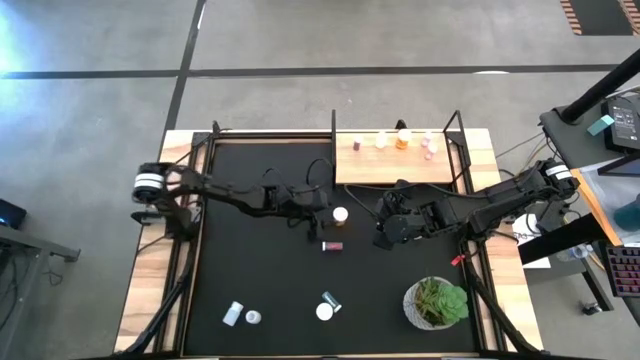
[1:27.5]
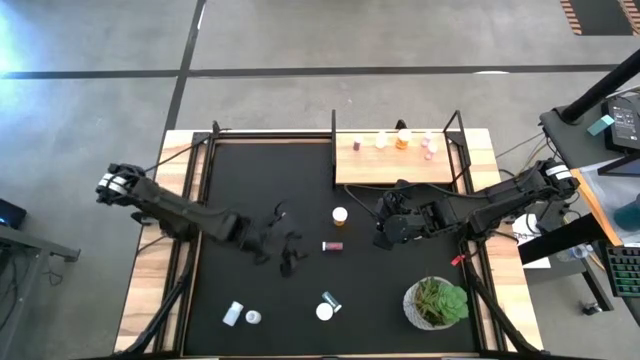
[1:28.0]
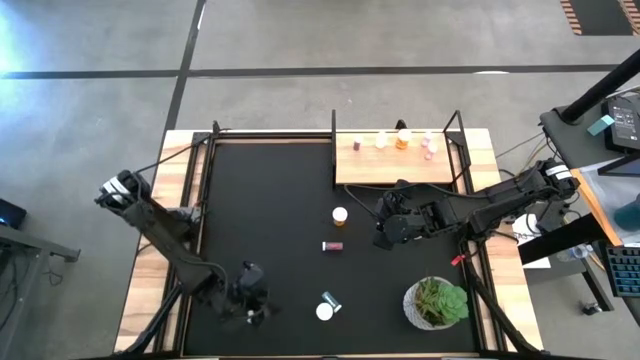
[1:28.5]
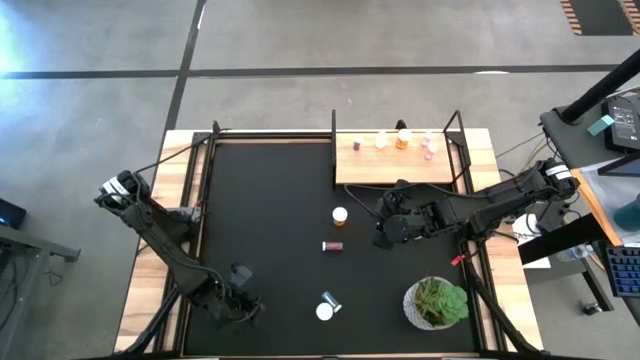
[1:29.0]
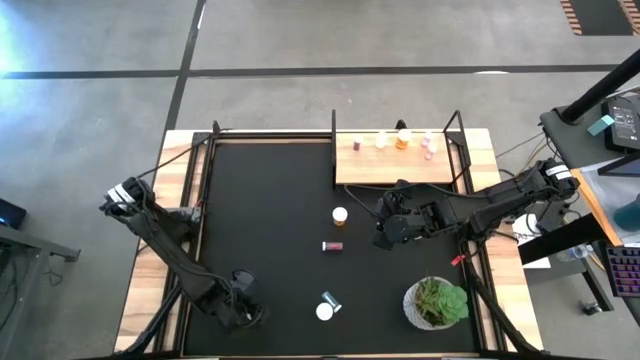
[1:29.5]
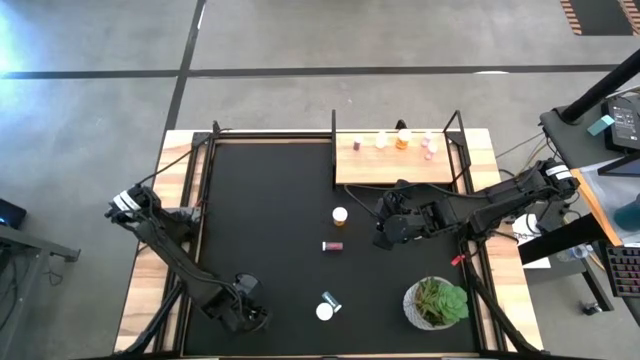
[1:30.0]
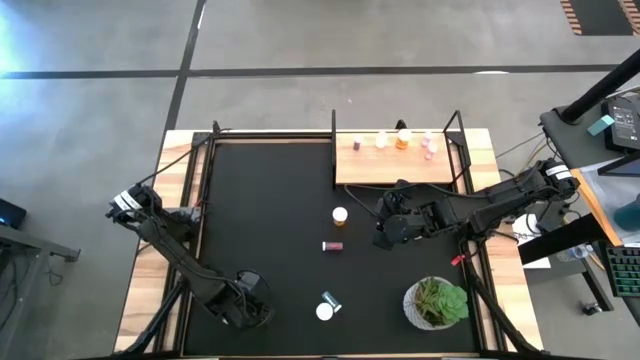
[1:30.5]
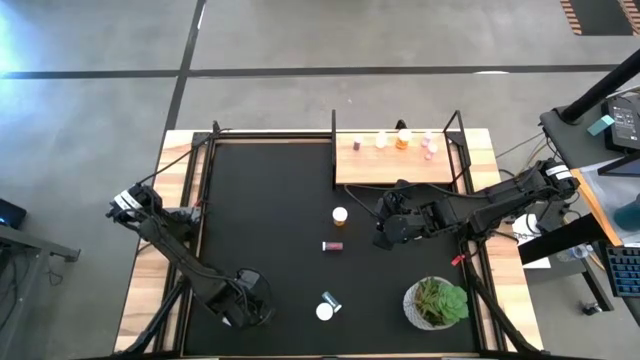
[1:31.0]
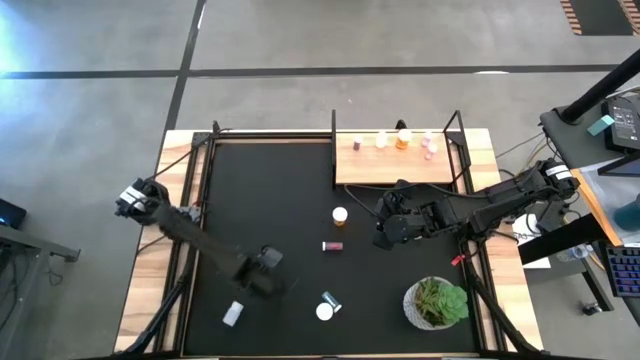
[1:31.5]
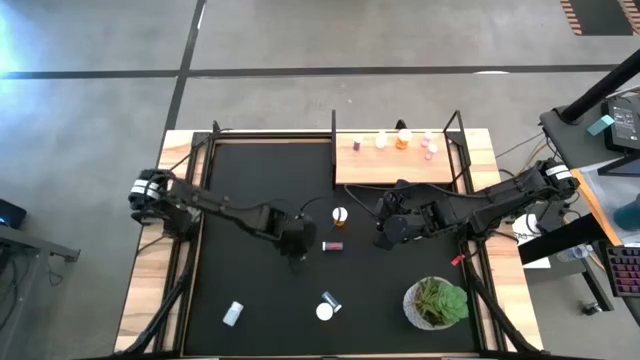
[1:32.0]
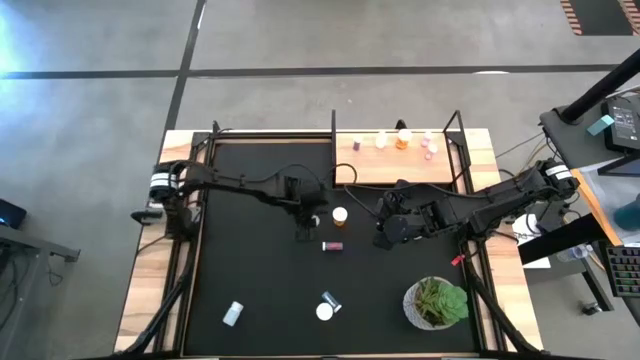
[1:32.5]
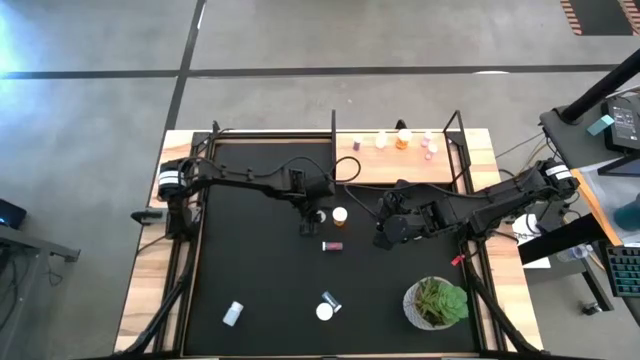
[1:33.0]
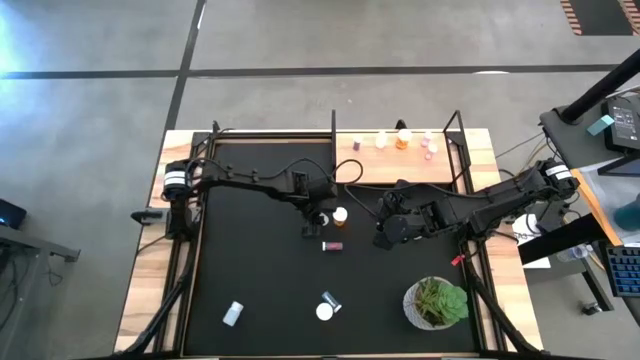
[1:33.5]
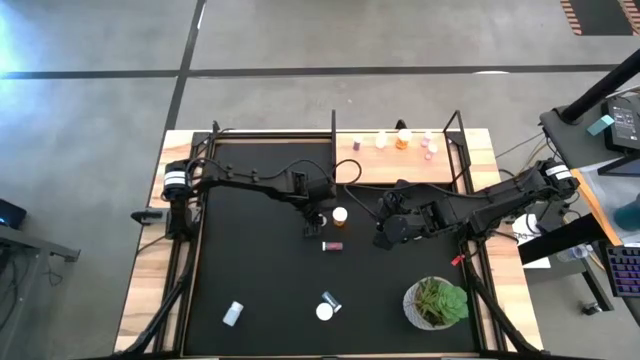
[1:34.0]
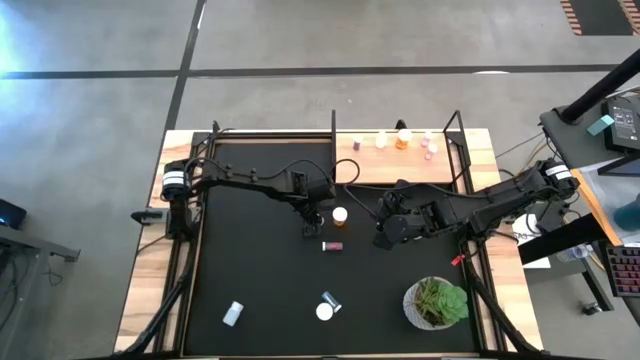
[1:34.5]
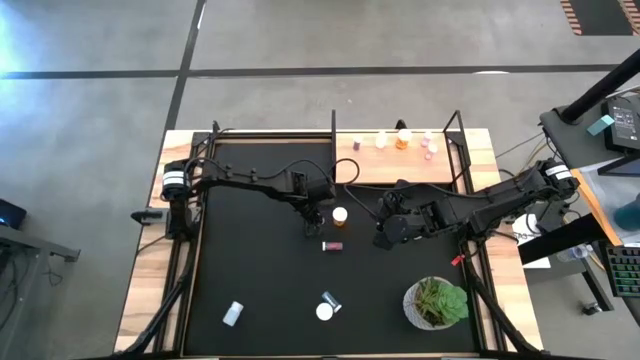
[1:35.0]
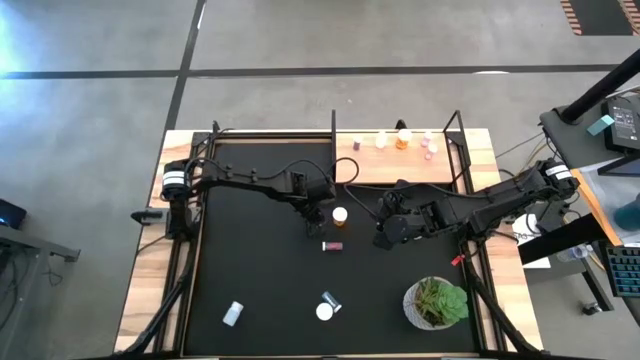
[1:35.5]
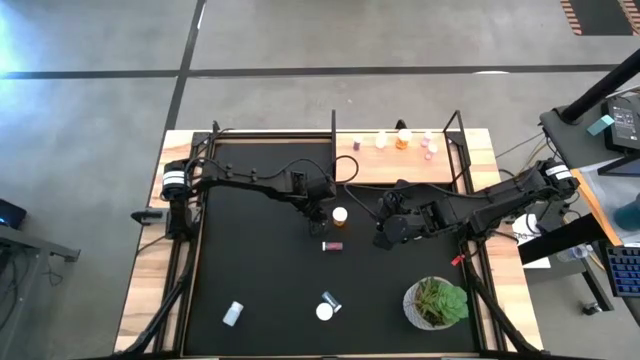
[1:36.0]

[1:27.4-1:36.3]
Task: Pick and place medicine bottles onto shelf by color
Move the right white pill bottle to the center of the table

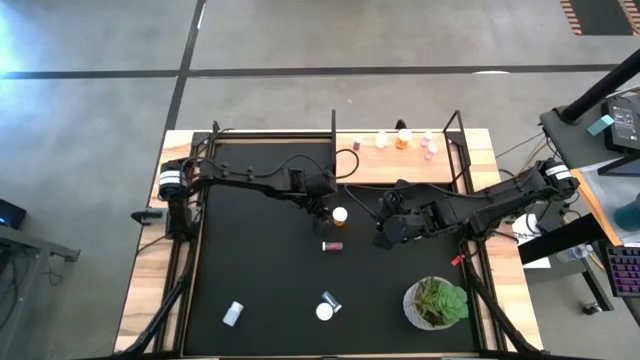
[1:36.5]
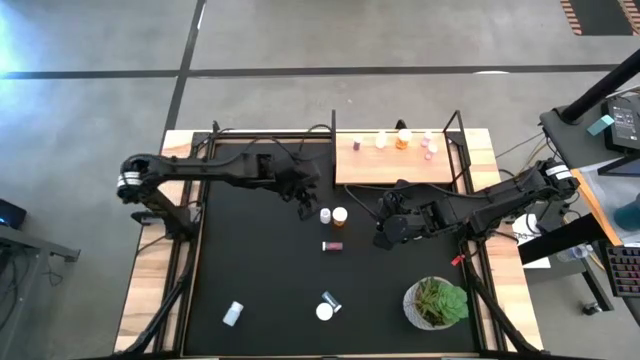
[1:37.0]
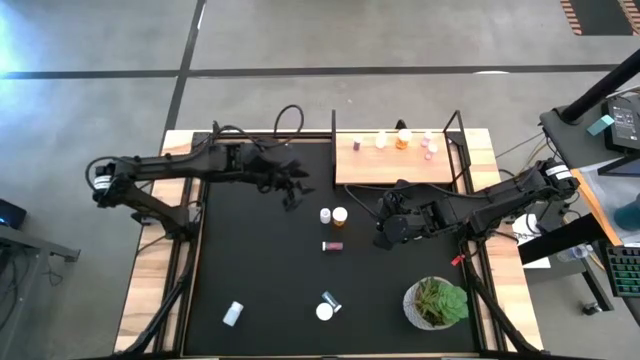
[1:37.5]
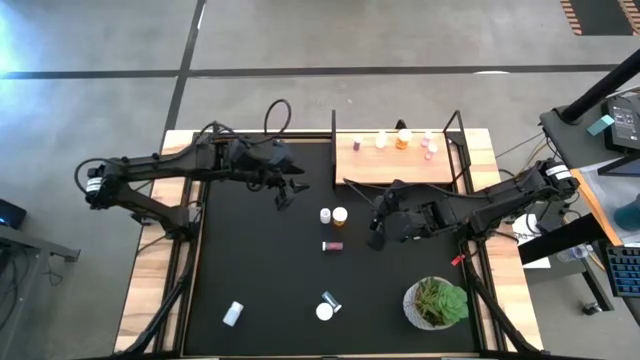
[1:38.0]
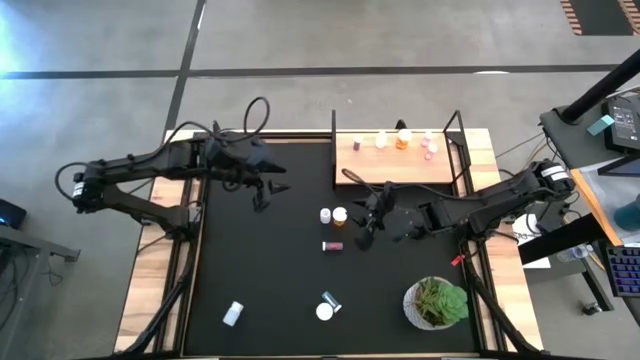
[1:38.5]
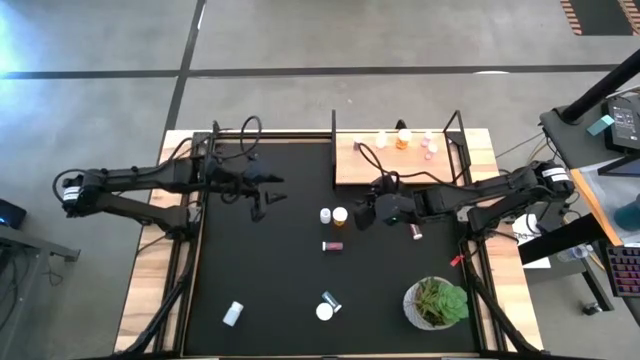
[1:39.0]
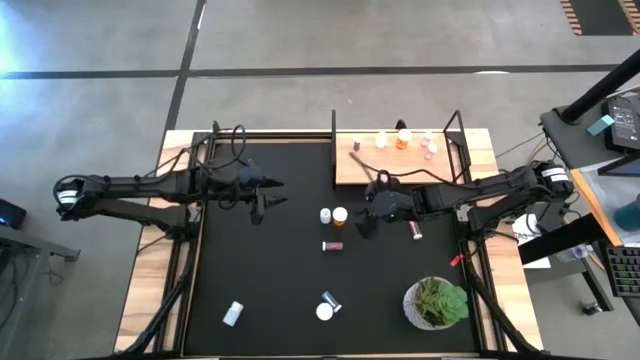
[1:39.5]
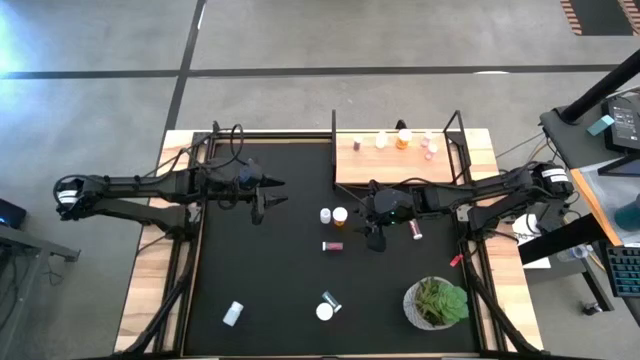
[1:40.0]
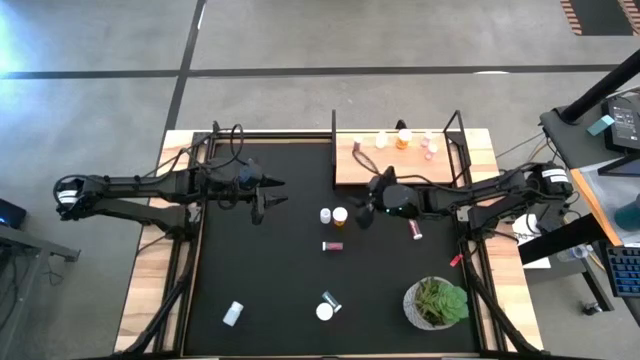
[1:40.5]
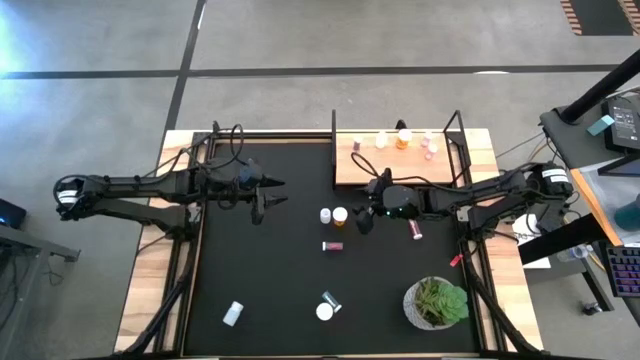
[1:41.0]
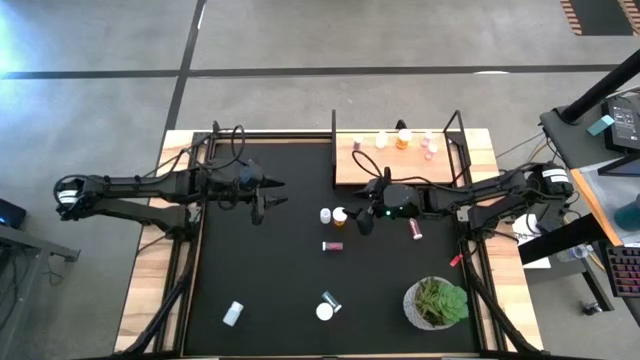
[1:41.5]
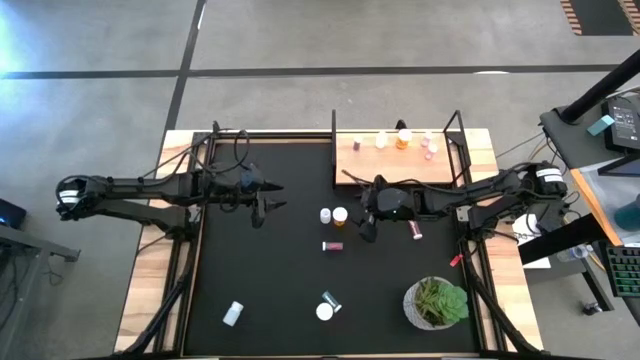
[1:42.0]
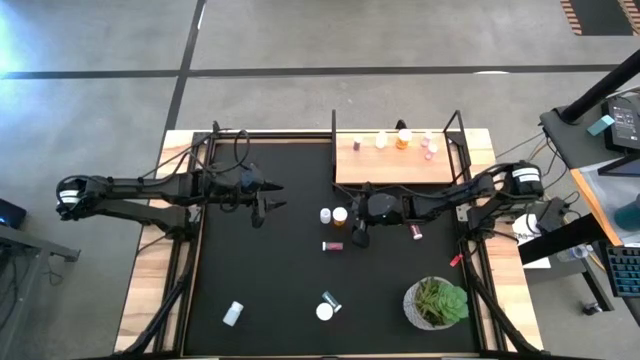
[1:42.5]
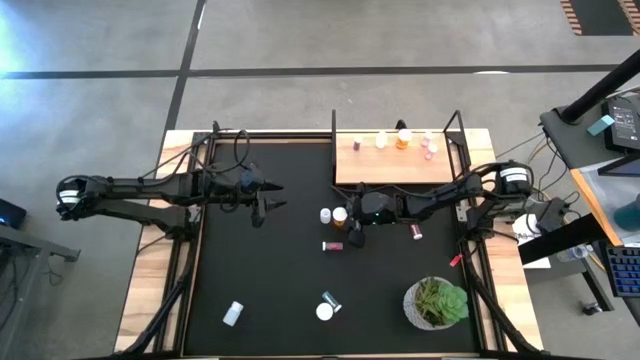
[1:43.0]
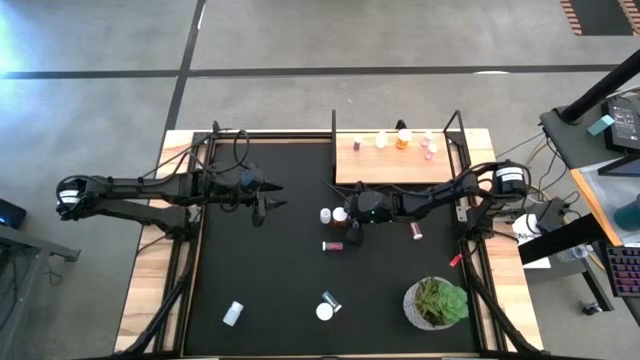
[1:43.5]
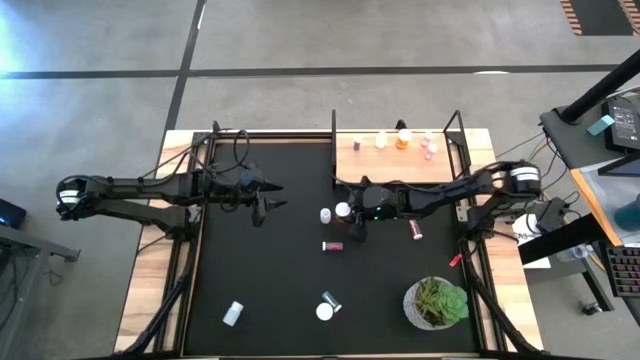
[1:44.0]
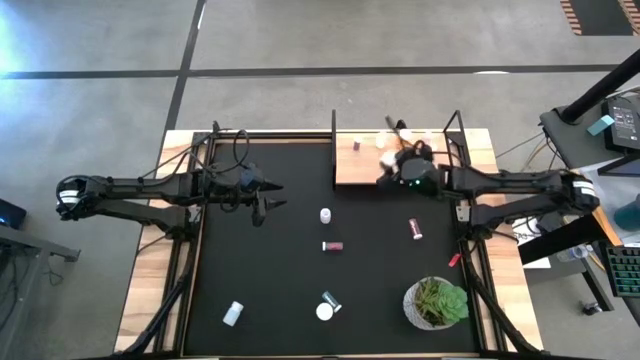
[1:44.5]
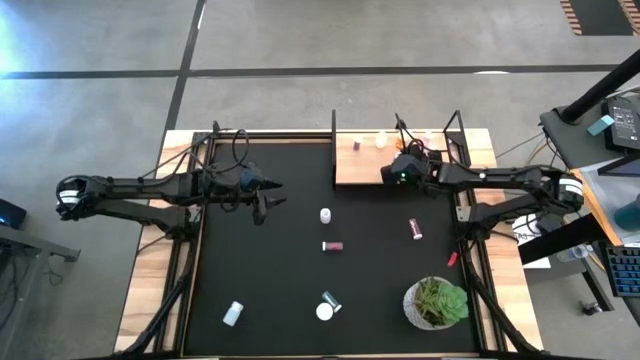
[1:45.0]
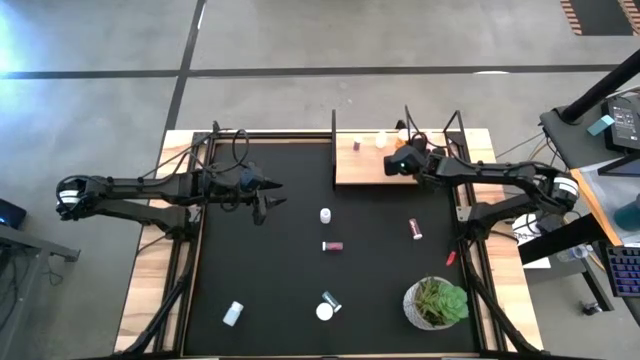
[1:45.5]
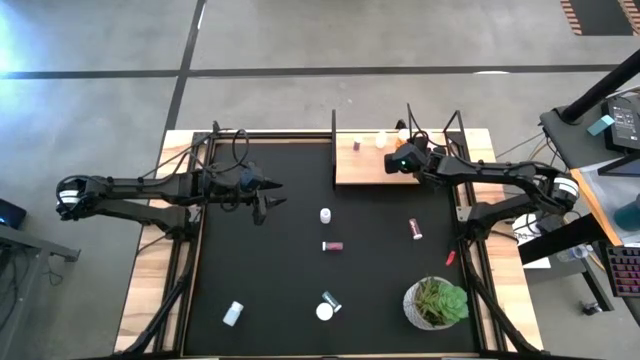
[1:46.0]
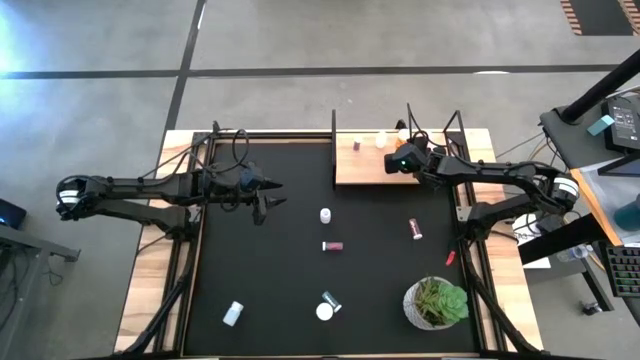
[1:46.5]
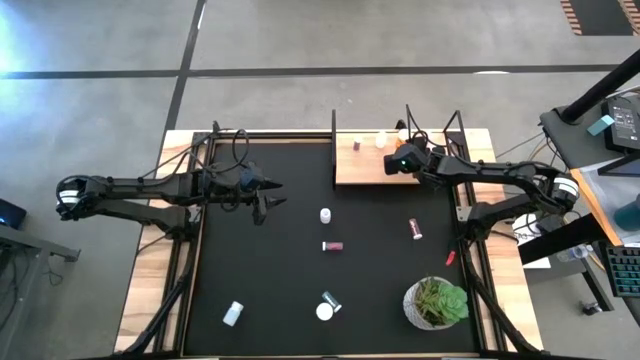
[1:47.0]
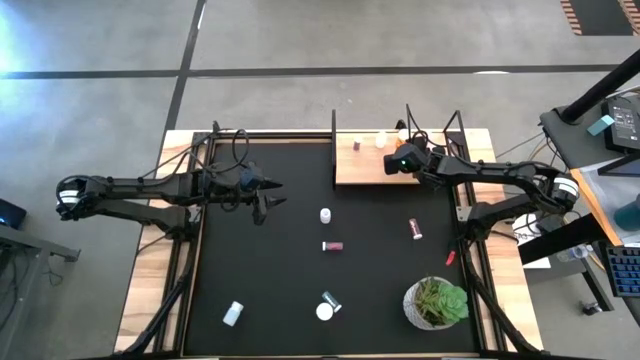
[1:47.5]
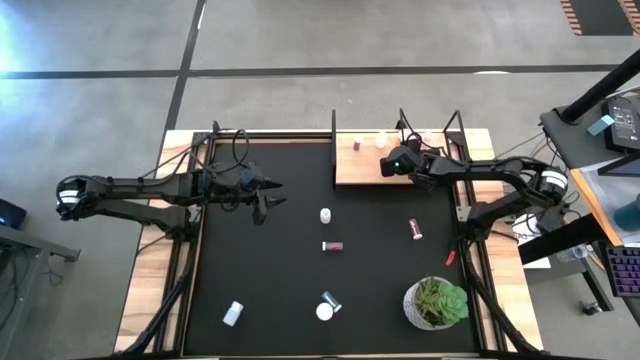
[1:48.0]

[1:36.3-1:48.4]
Put the top orange pill bottle on the shelf aligned with the other orange pill bottle

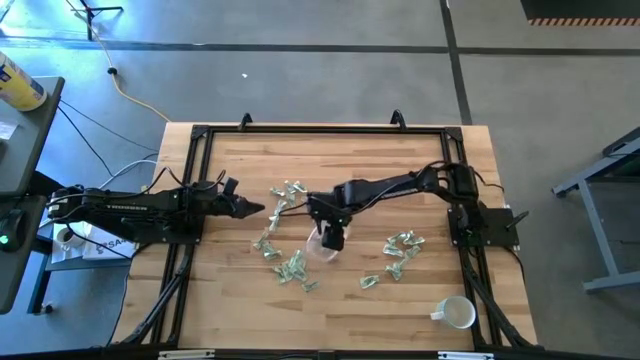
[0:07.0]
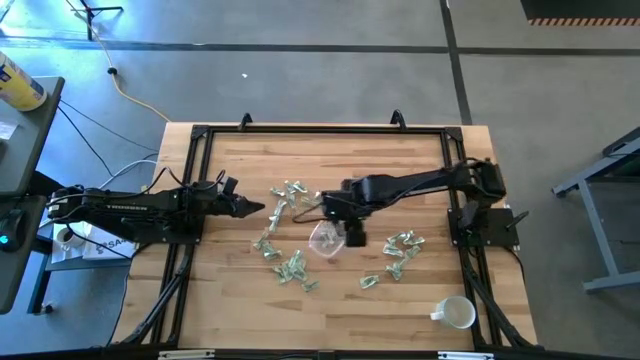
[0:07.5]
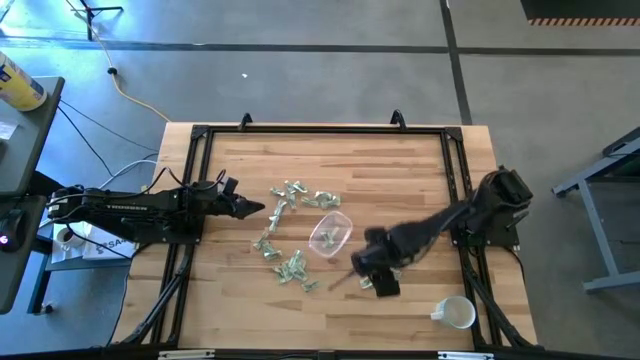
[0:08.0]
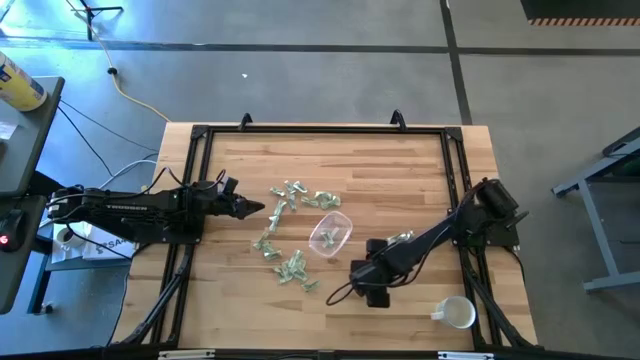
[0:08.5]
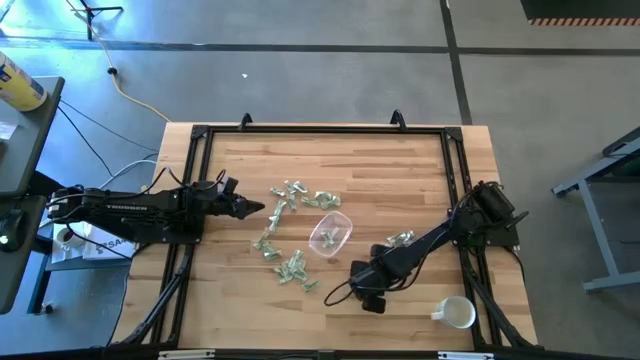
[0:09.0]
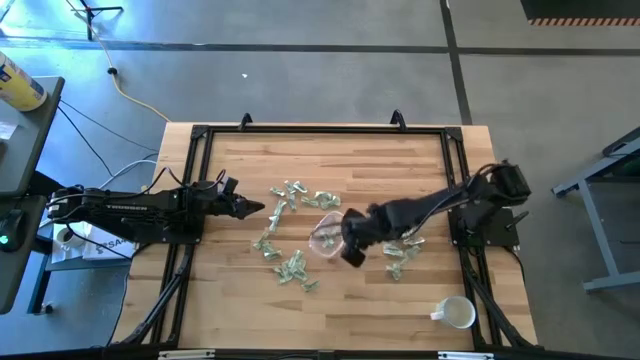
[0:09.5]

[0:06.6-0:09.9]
Task: Pick and place Stevia / Truvia into bins
Put the stevia packet into the transparent bin
